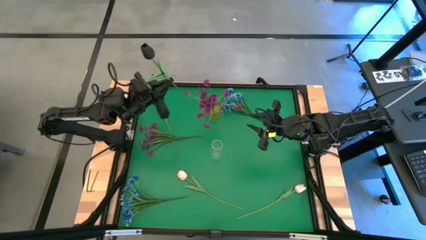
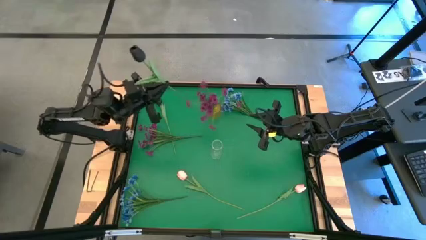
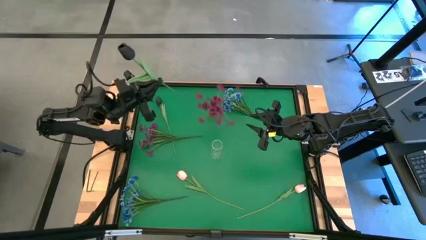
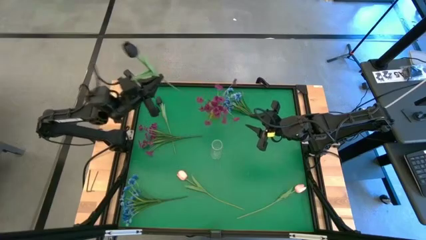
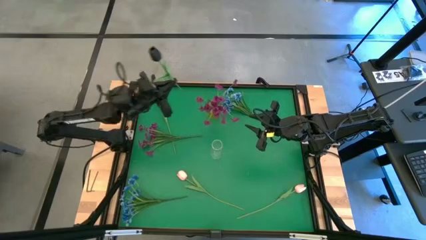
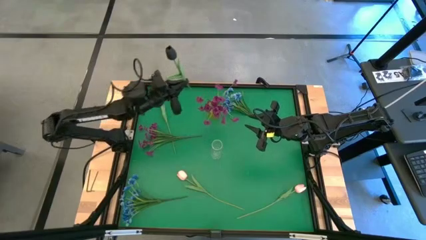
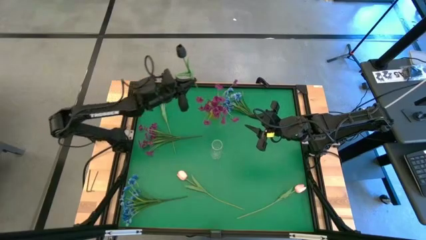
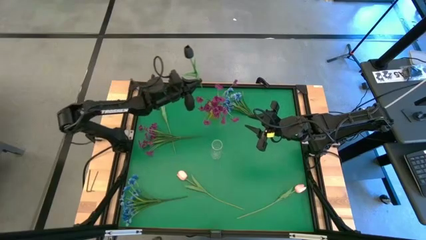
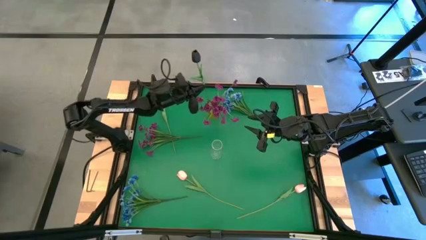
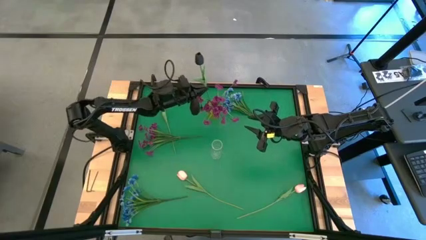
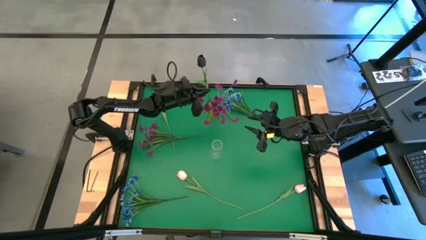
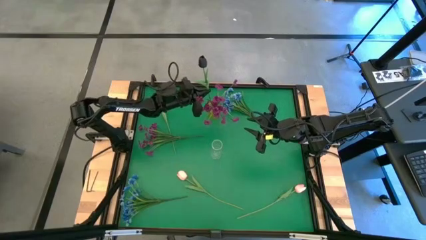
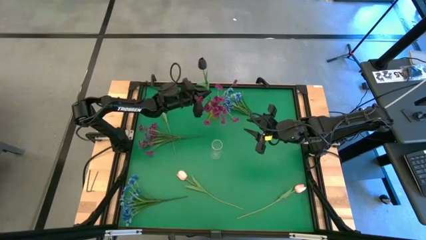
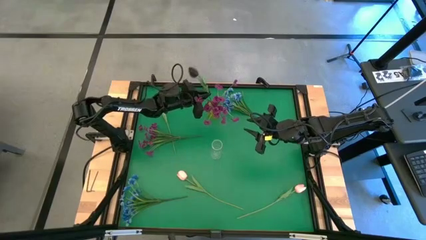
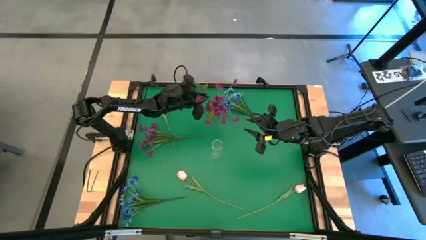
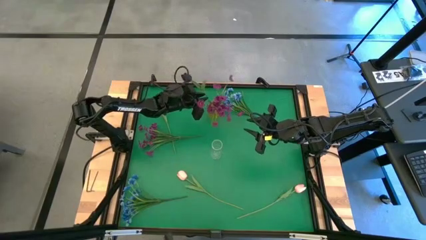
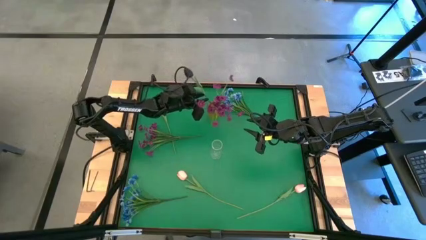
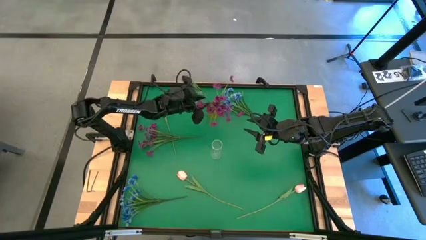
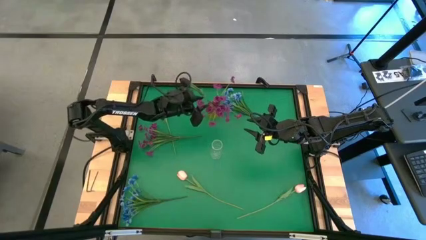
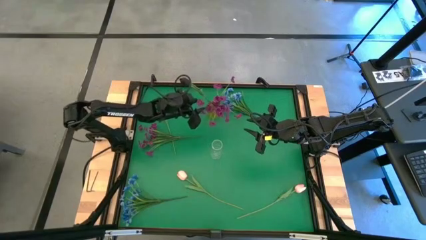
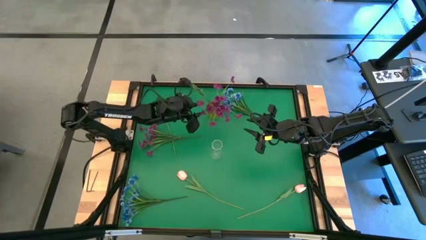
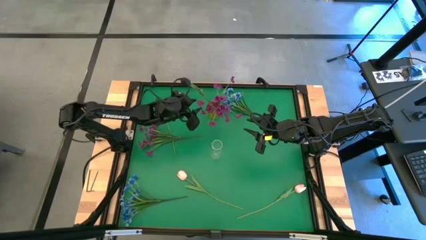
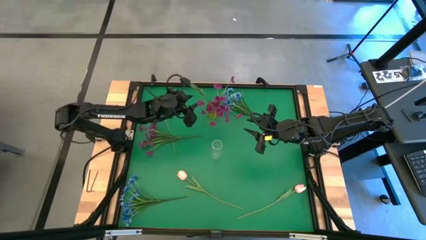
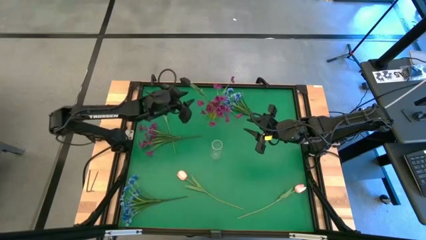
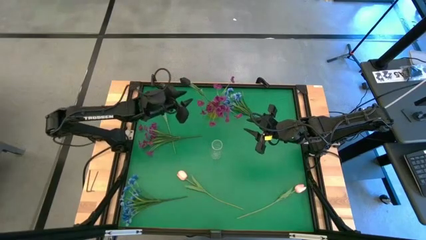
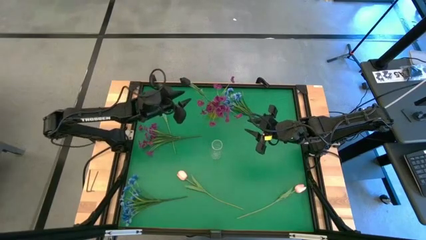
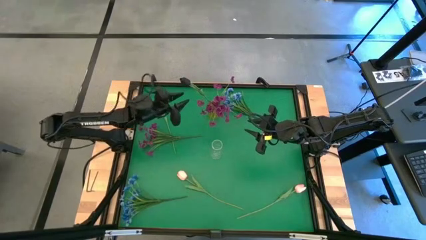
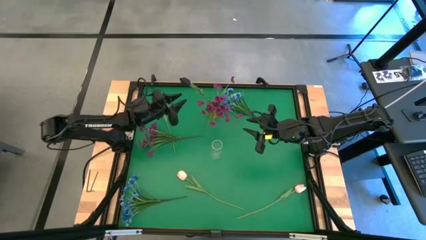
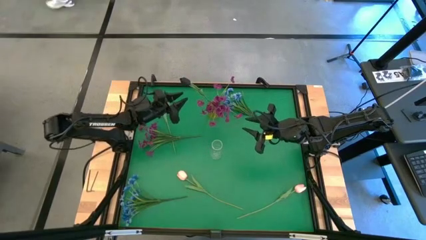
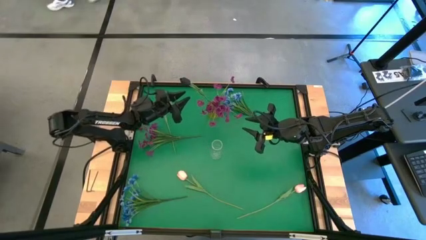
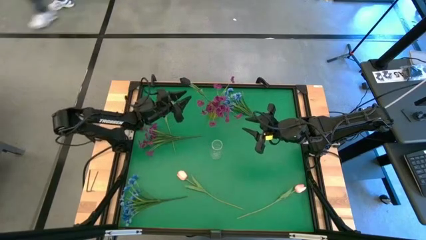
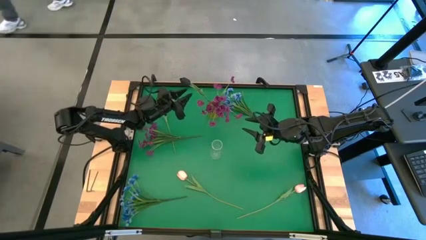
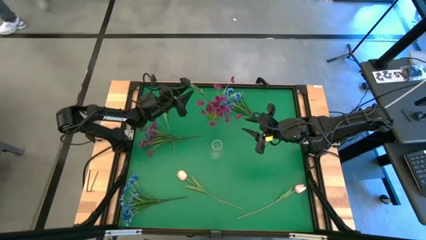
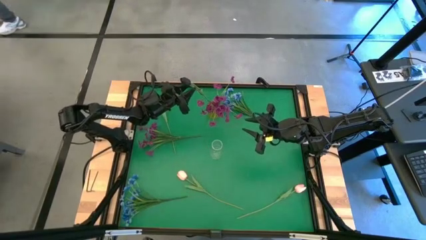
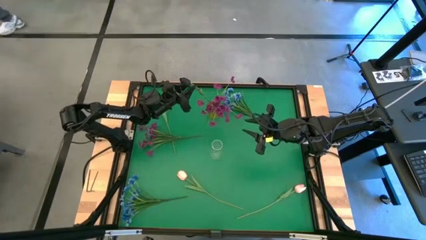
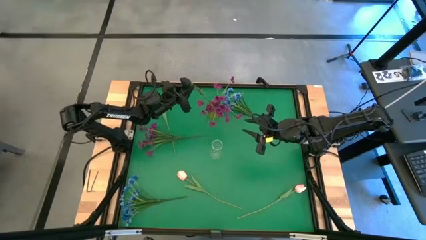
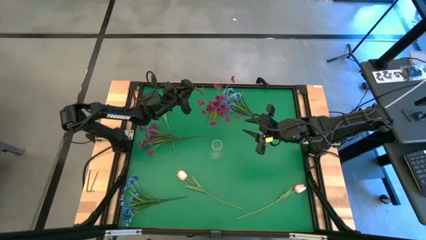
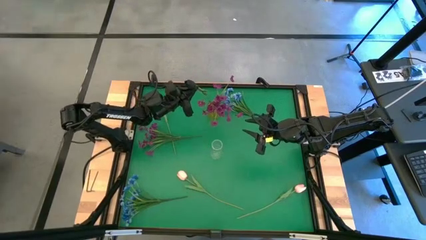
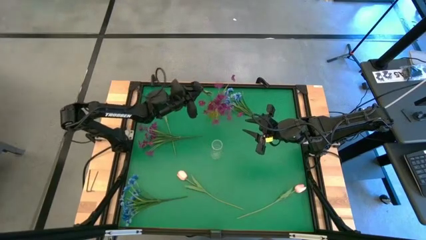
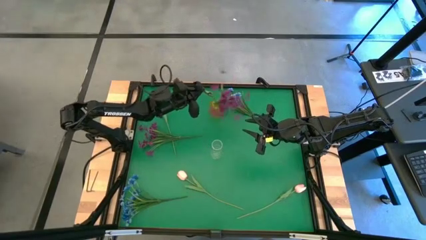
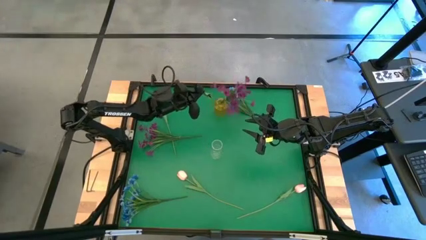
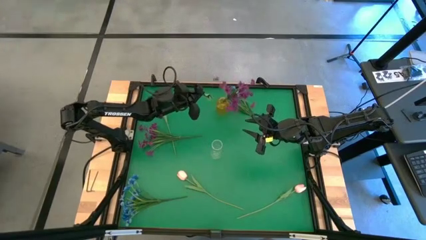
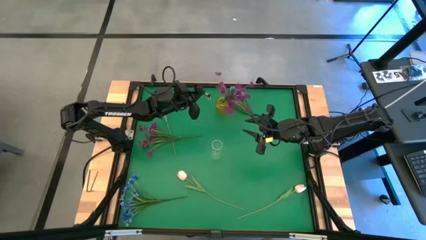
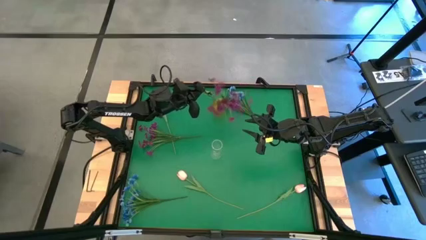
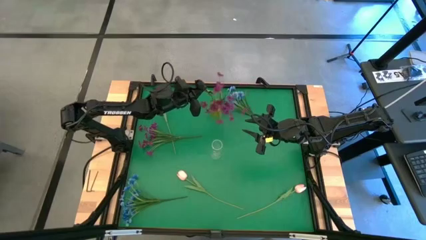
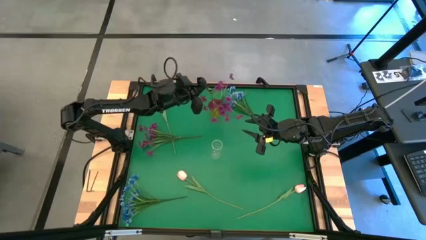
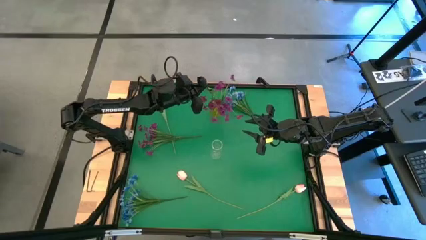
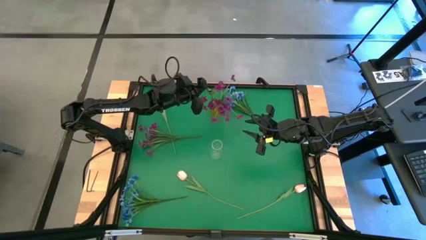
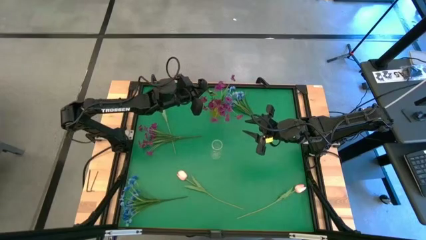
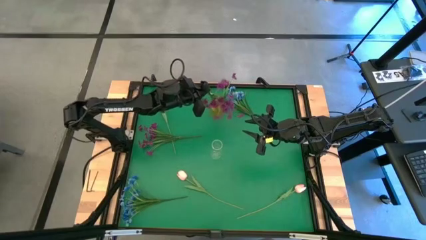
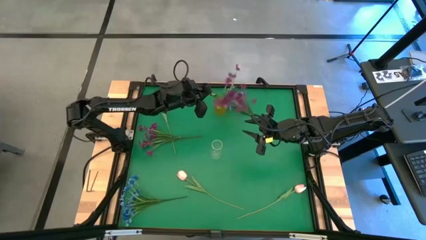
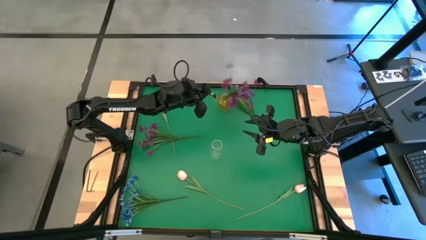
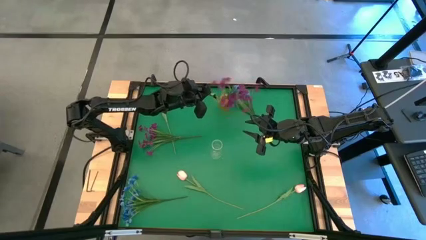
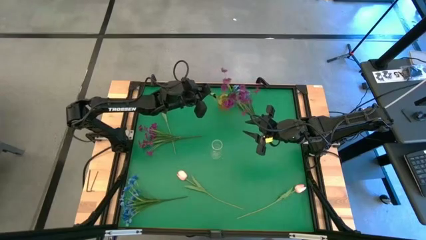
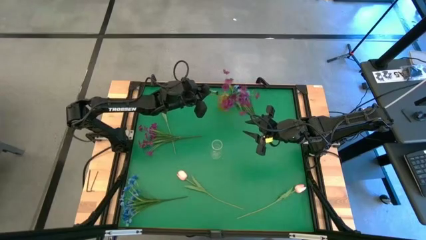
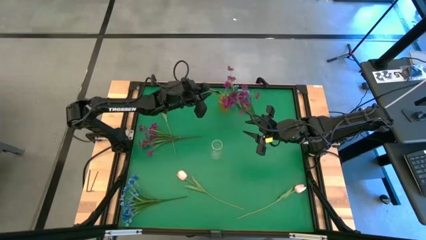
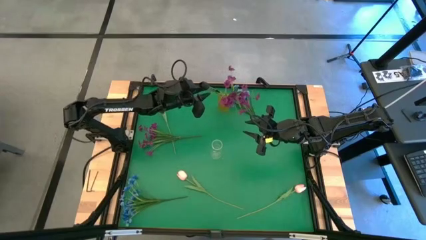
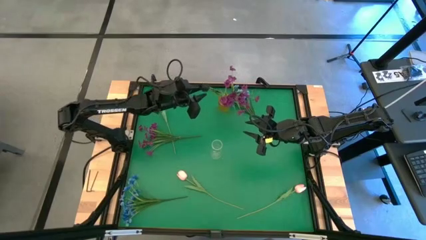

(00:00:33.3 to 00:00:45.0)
Task: Sort flowers into vase by color
Put the bottom flowers into the yellow vase

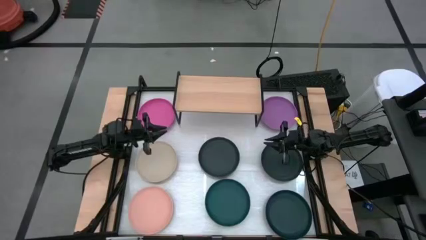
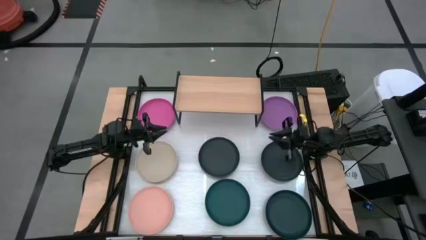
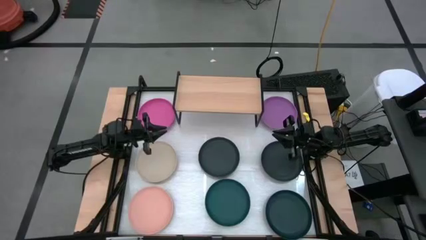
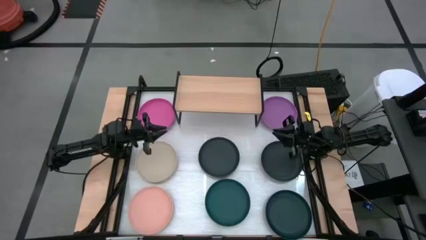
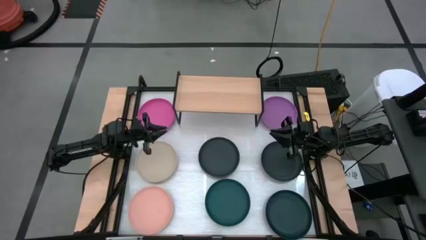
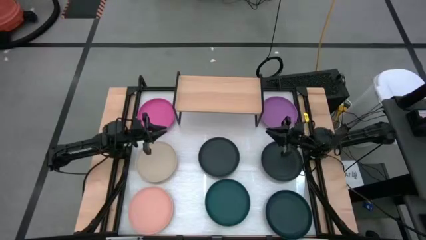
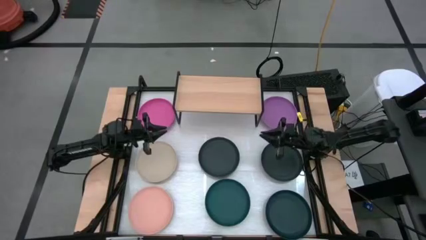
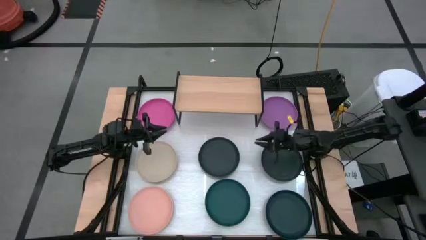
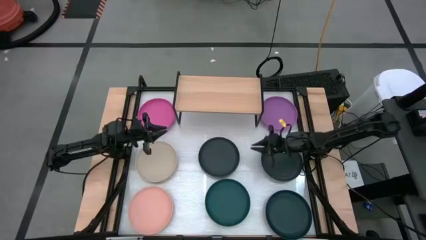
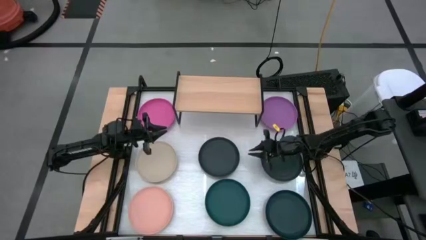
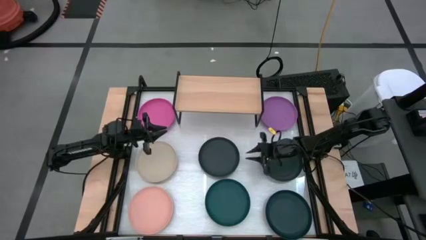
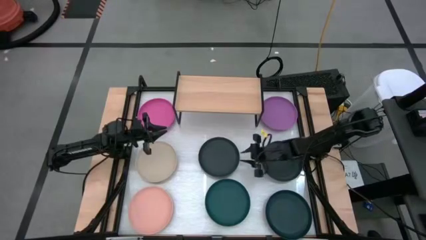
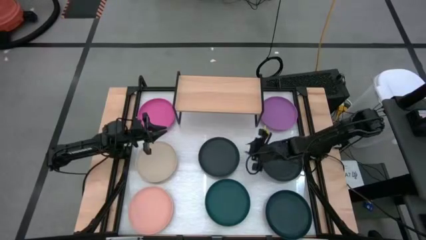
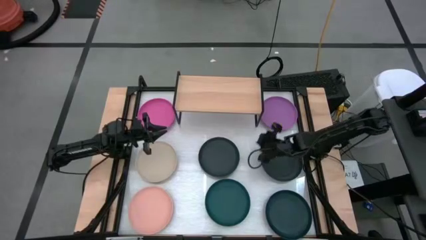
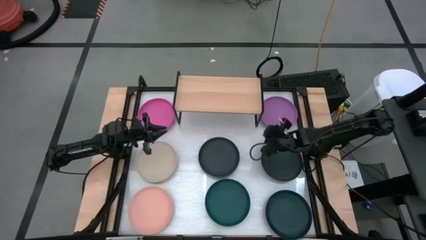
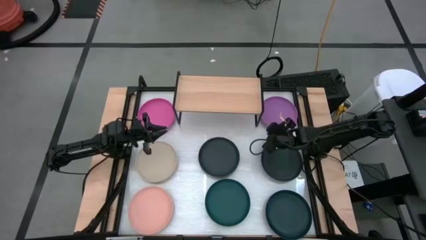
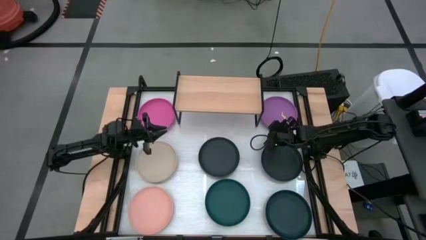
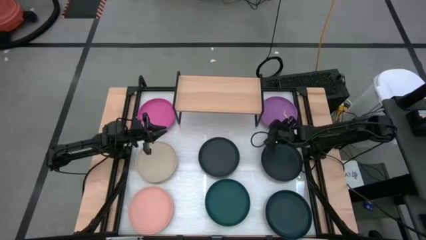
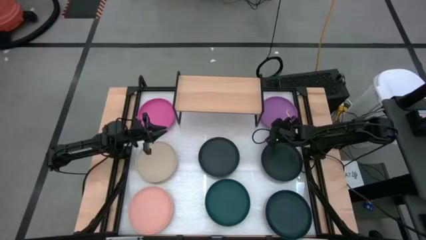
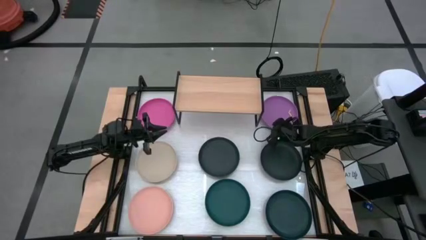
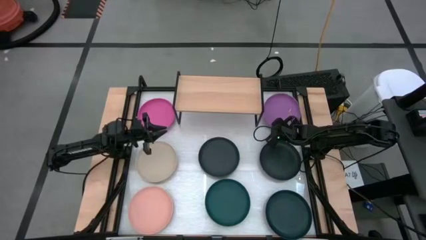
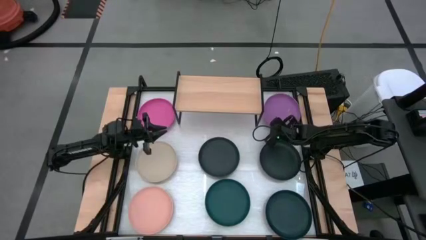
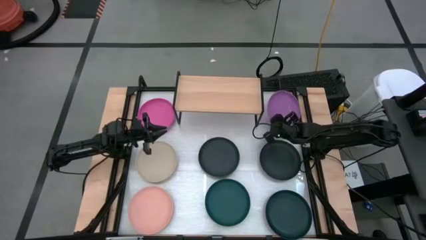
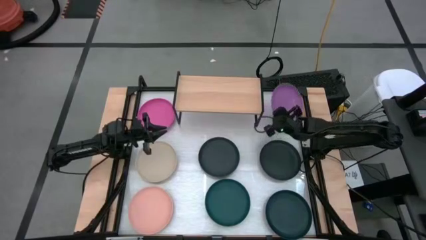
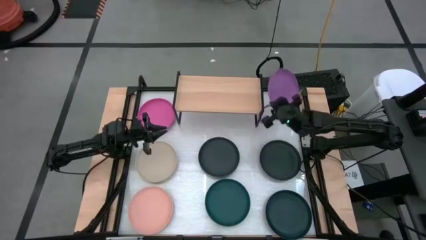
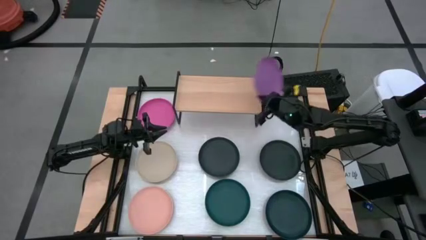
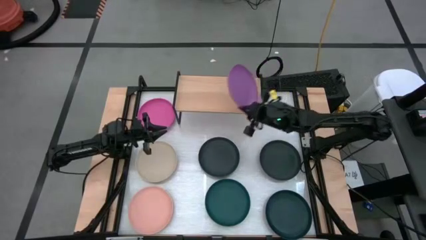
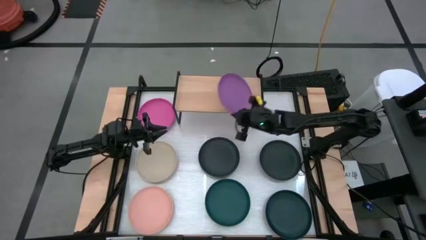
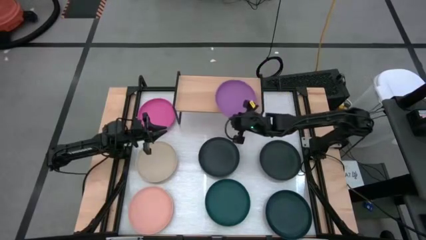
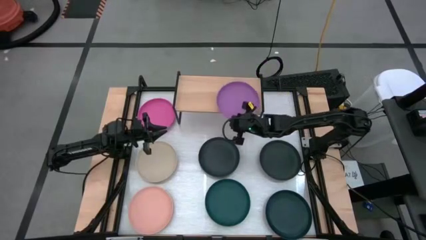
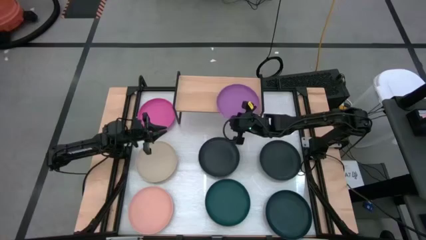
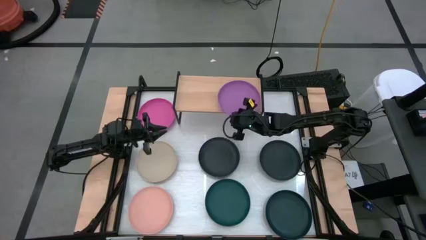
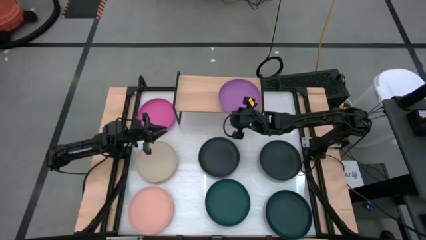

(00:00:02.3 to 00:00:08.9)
Task: Place and stack plates onto a shelf
Put the purple plate on the shelf
